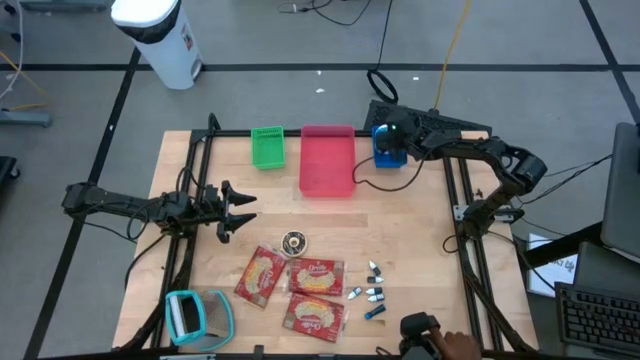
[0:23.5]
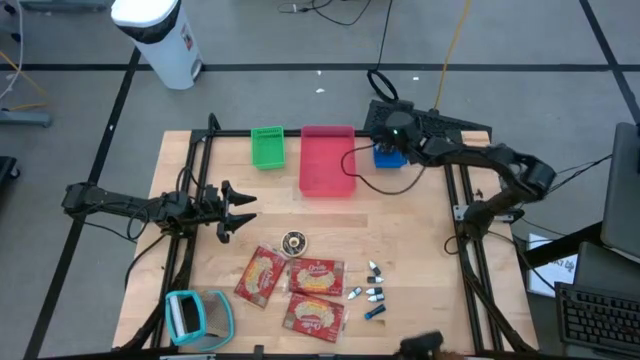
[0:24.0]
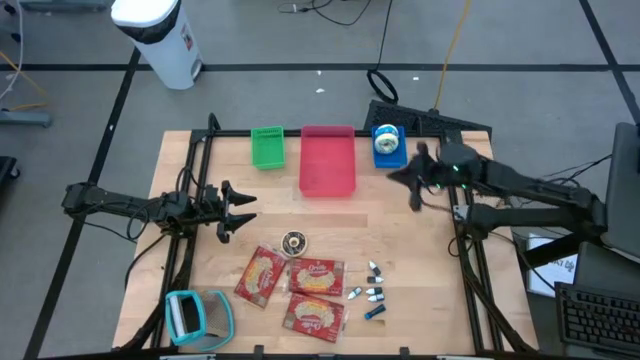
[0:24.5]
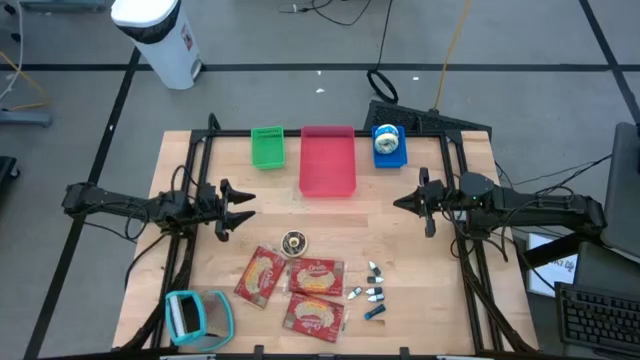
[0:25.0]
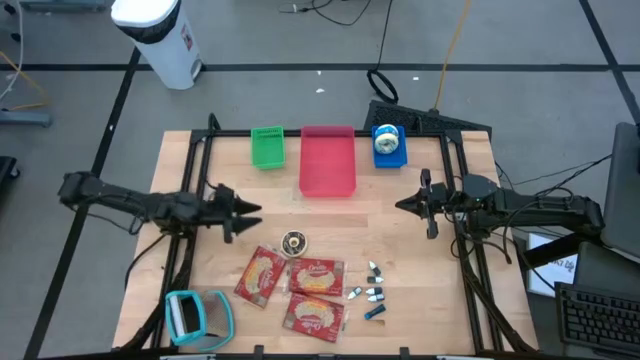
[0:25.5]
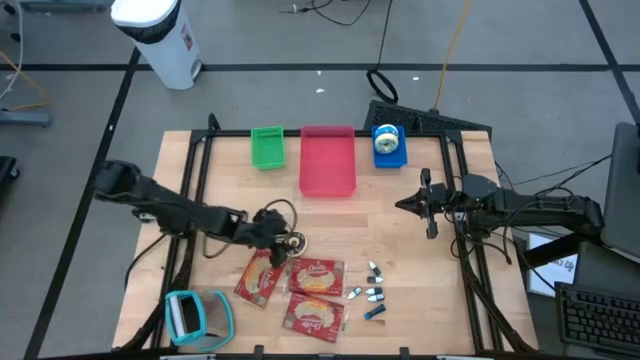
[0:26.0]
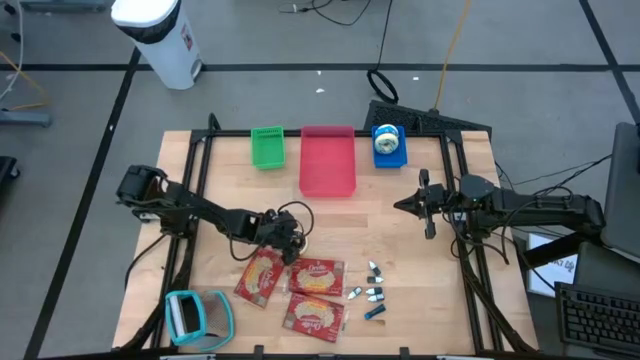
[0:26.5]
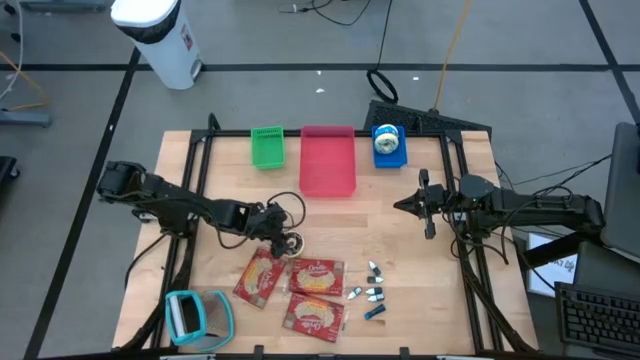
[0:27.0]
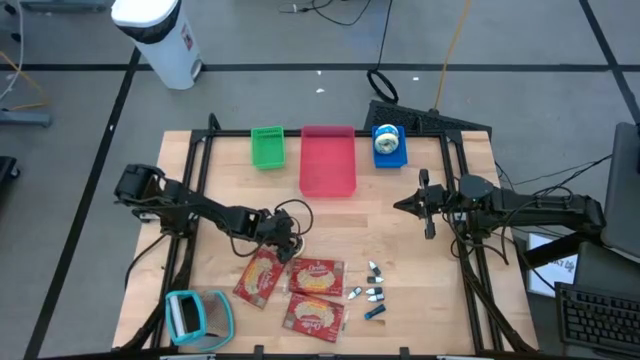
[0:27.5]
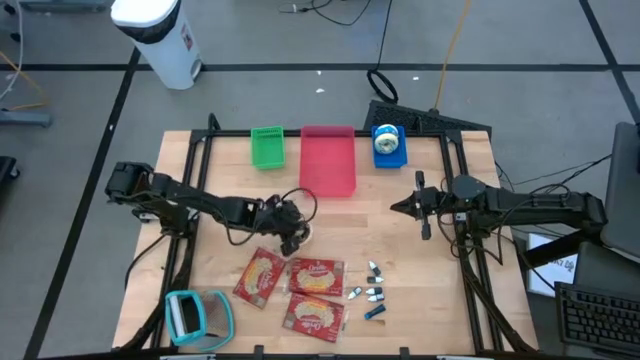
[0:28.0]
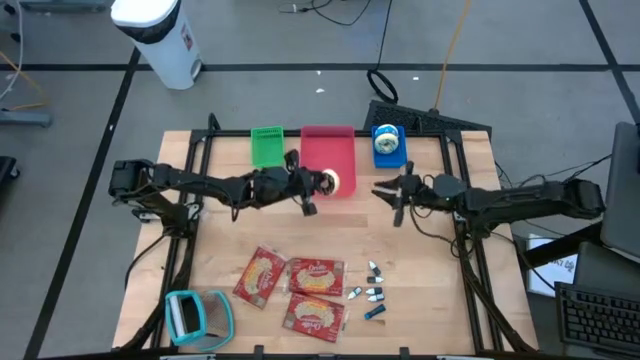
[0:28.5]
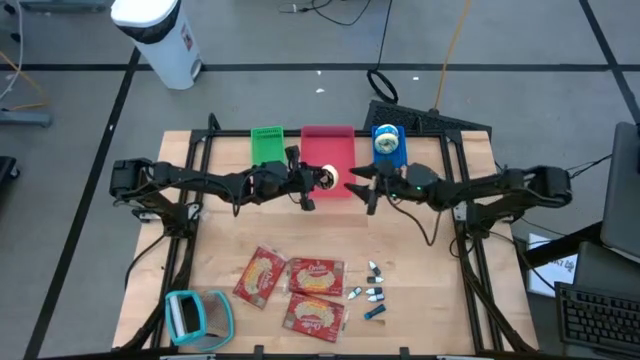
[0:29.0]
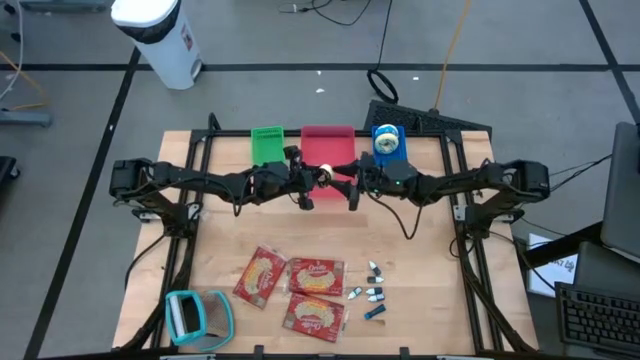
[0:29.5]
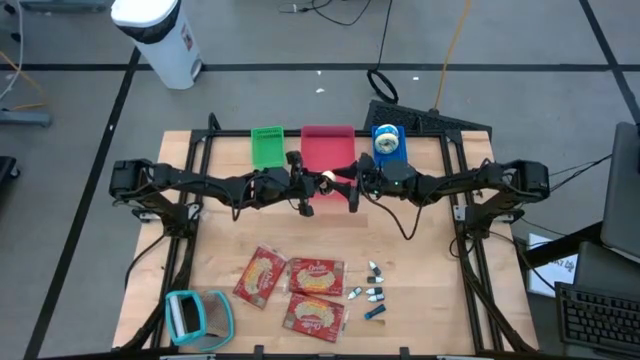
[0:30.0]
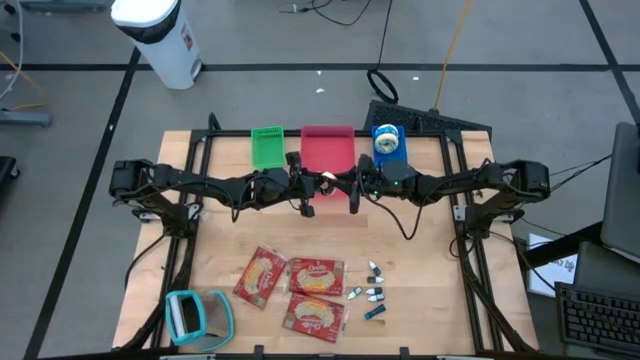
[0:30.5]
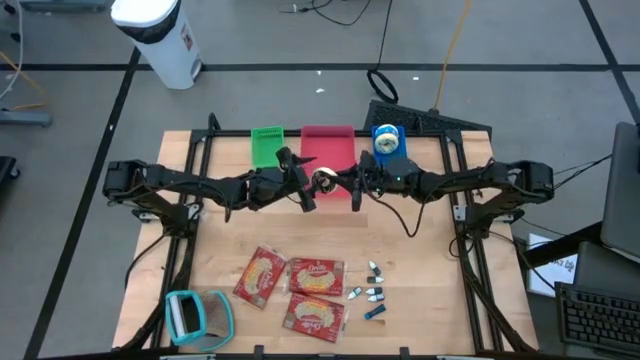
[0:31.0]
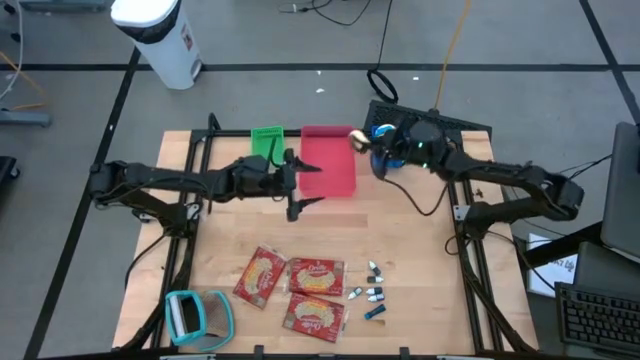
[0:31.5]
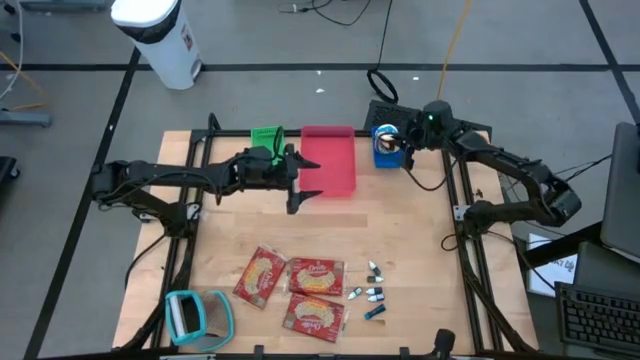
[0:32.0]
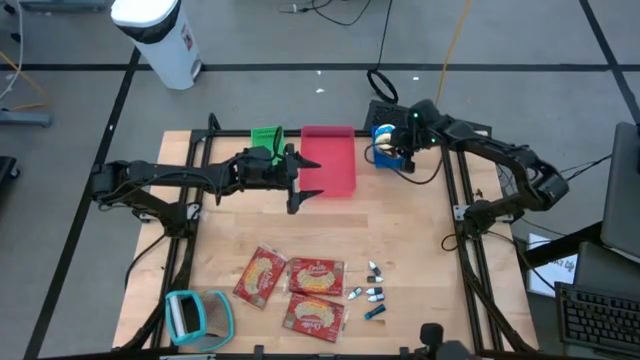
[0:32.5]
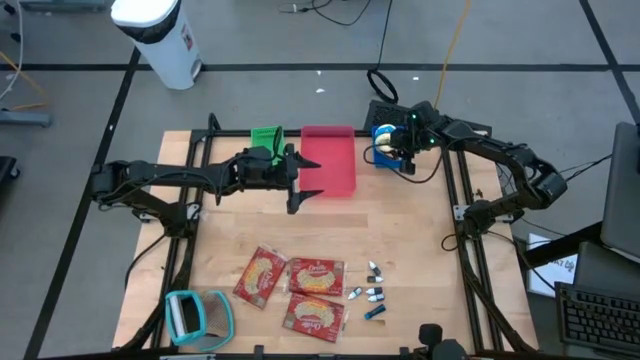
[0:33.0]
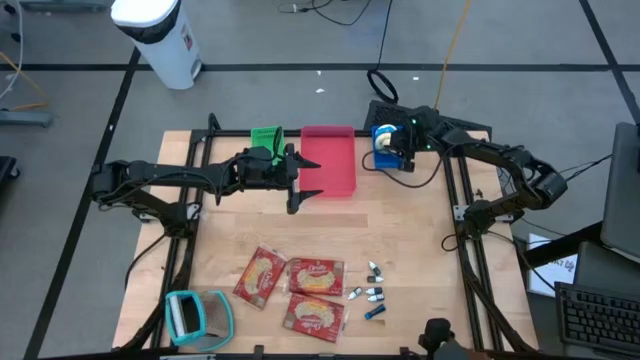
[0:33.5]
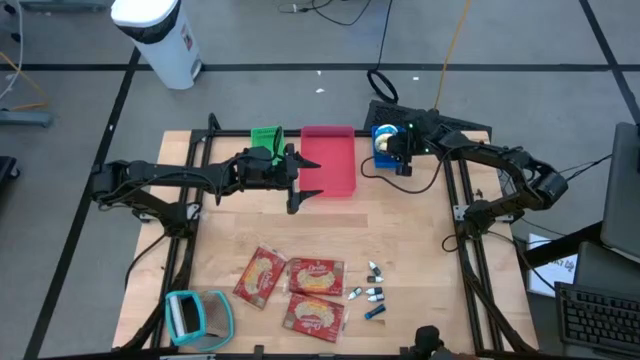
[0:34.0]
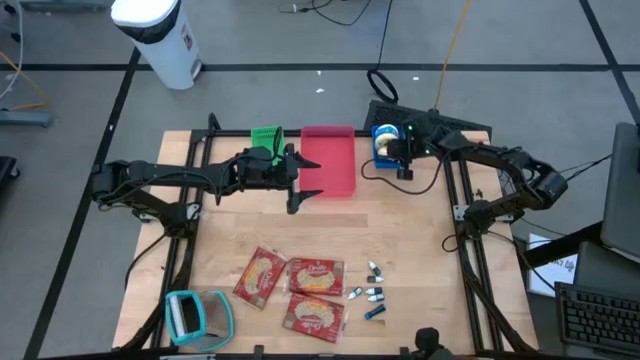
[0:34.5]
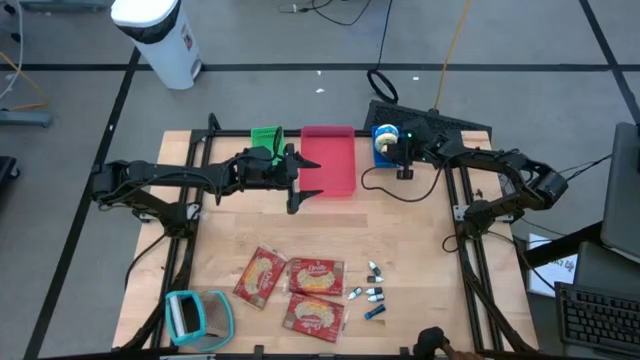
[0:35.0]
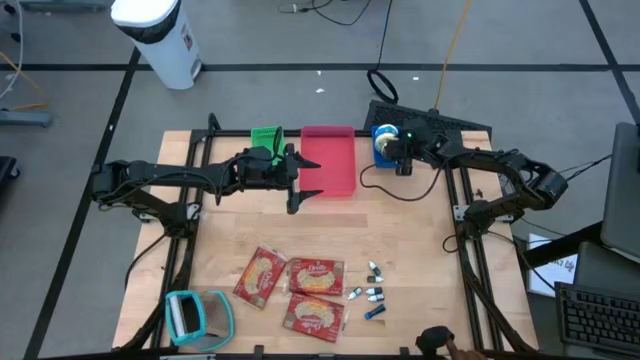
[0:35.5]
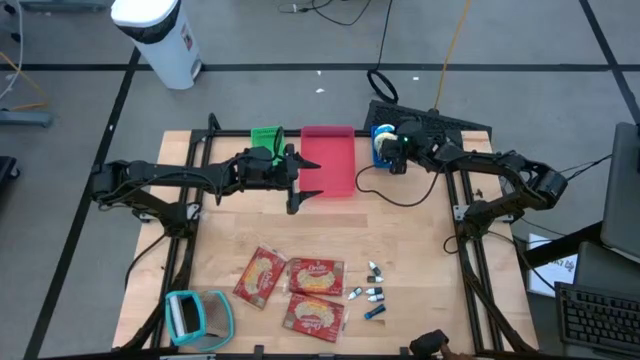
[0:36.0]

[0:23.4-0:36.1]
Put the black doughnut into the blue bin

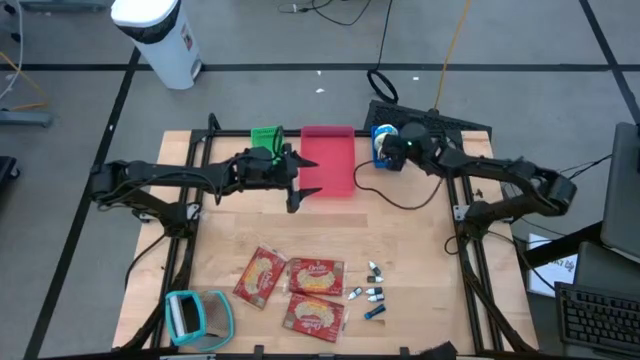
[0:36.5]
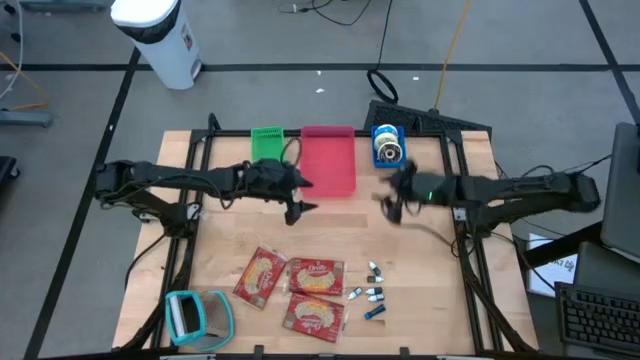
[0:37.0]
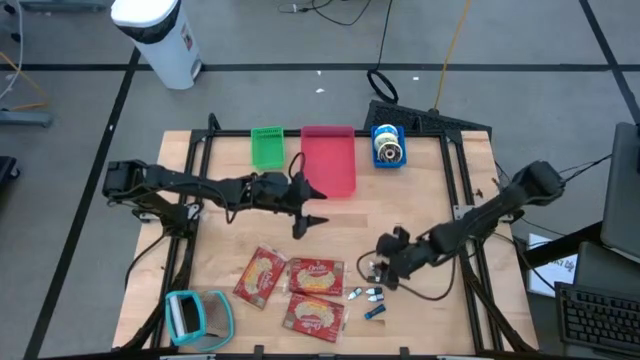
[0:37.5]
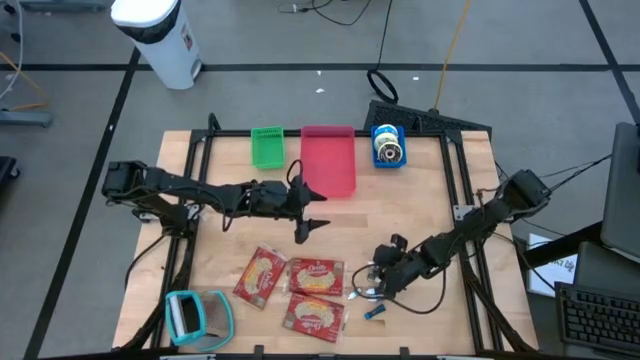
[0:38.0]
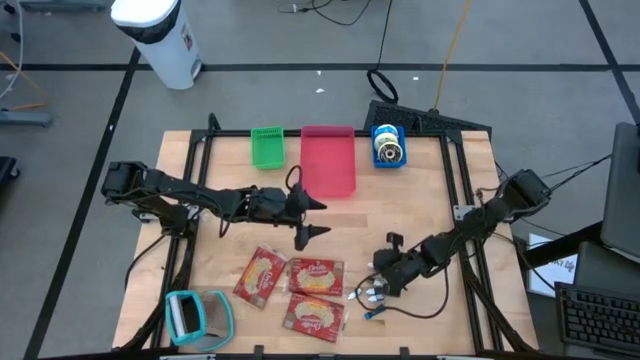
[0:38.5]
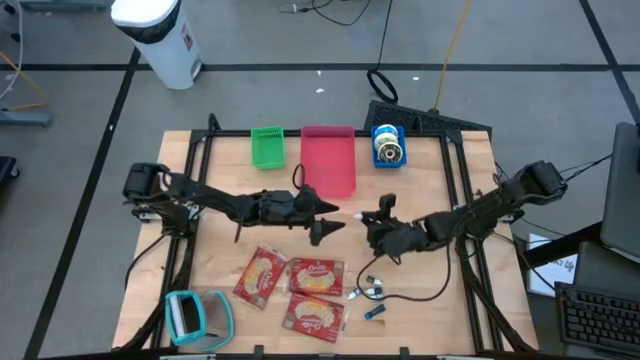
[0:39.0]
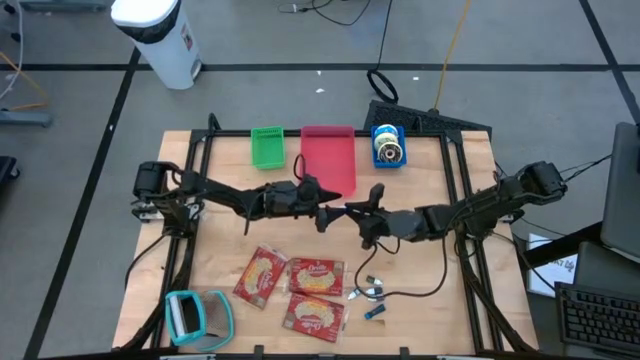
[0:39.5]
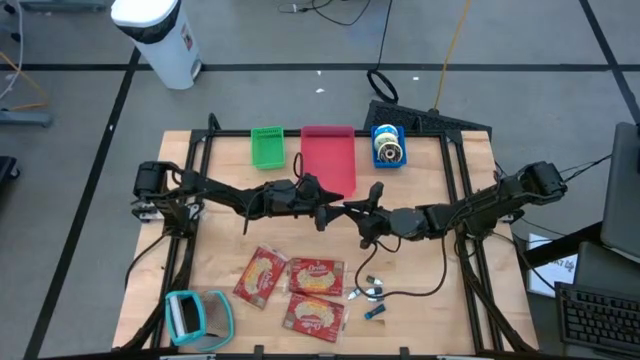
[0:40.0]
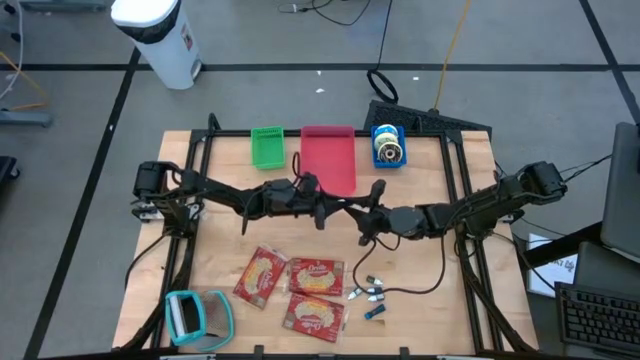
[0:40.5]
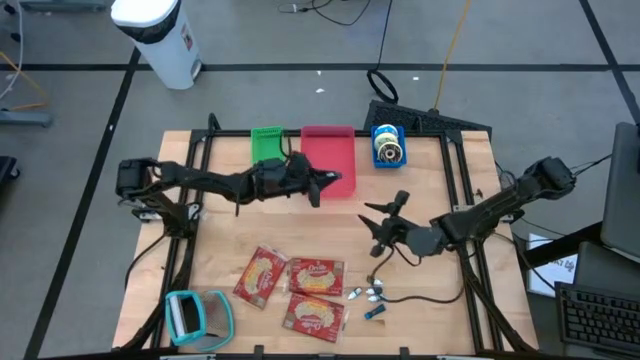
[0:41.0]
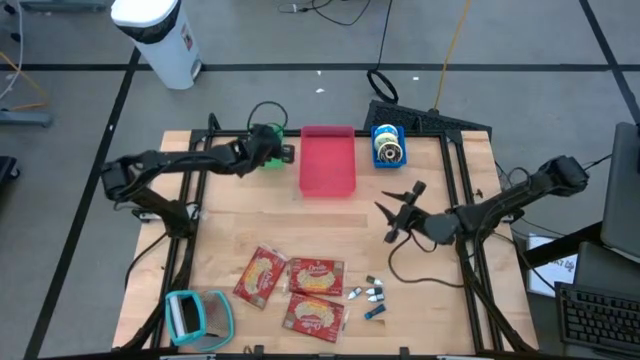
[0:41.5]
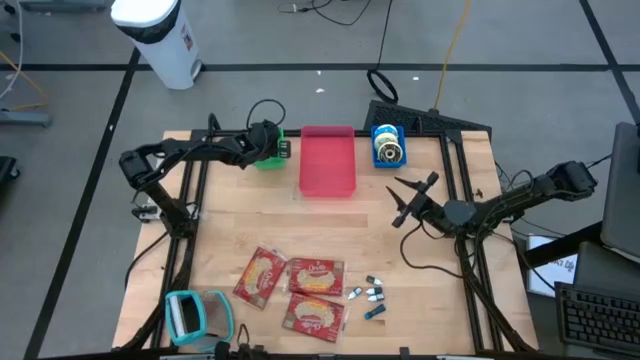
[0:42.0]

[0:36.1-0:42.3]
Put the top green food coloring bottle into the green bin
